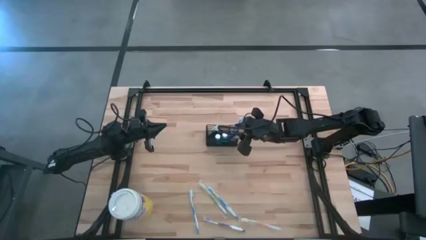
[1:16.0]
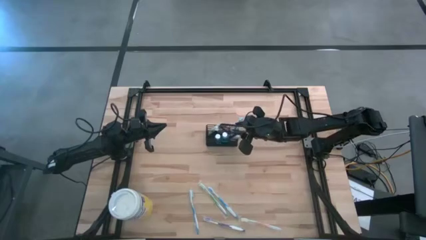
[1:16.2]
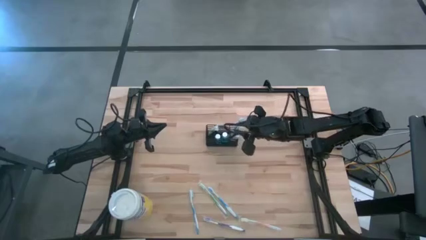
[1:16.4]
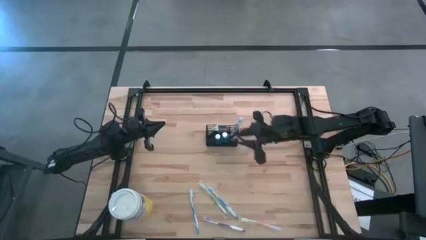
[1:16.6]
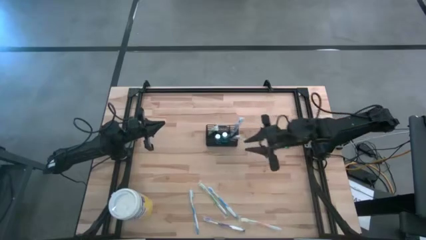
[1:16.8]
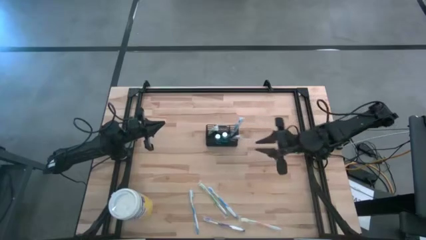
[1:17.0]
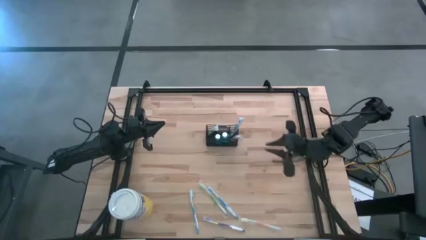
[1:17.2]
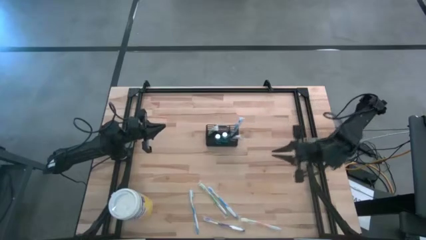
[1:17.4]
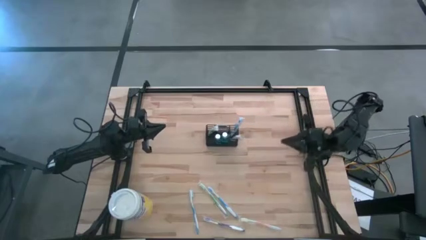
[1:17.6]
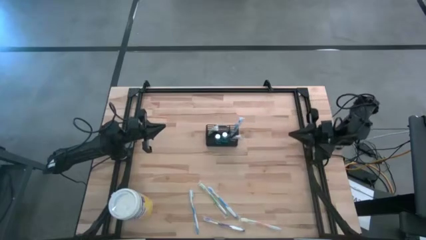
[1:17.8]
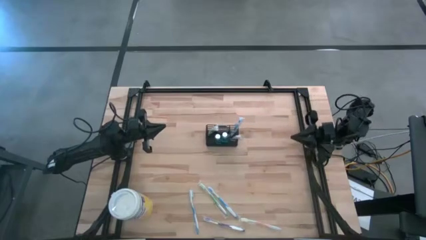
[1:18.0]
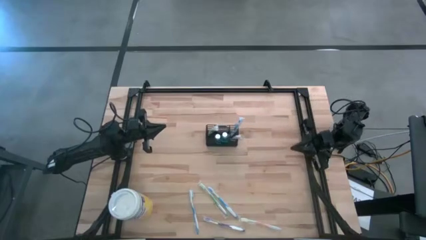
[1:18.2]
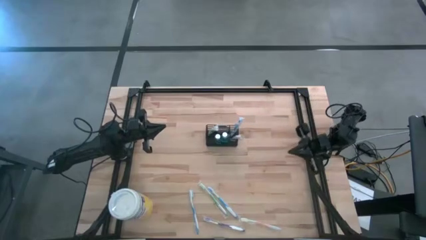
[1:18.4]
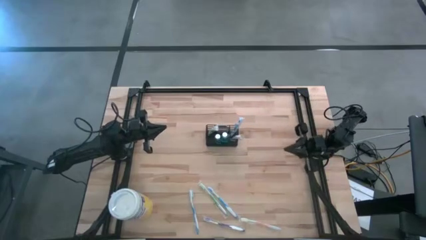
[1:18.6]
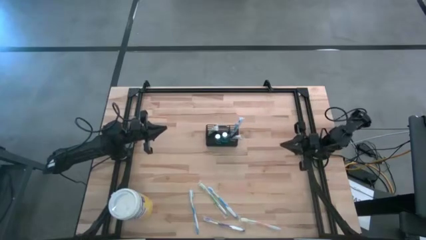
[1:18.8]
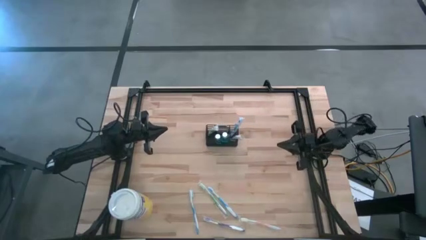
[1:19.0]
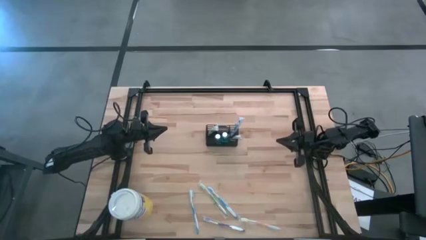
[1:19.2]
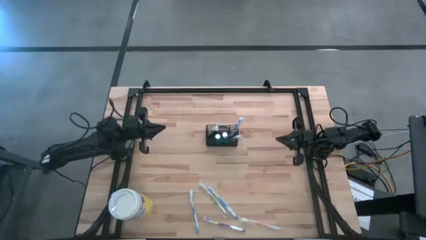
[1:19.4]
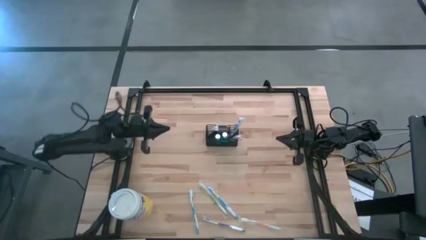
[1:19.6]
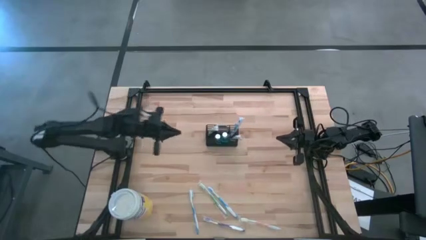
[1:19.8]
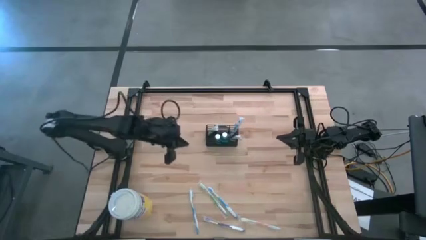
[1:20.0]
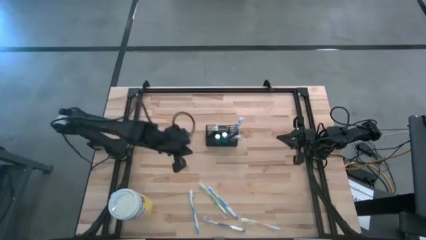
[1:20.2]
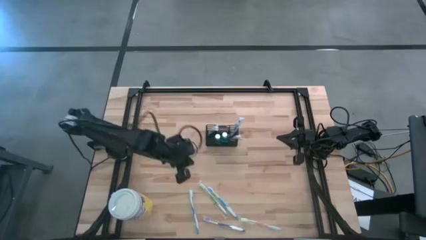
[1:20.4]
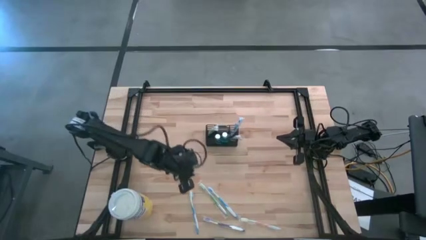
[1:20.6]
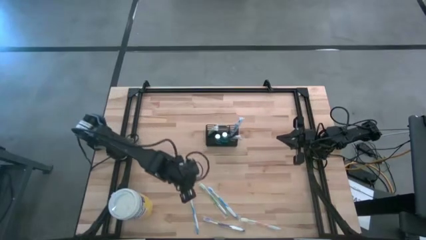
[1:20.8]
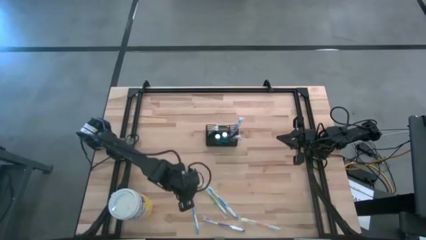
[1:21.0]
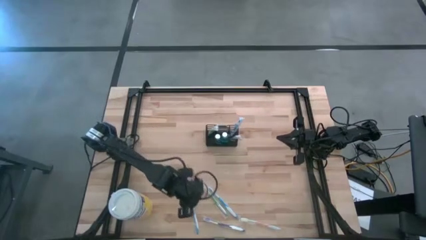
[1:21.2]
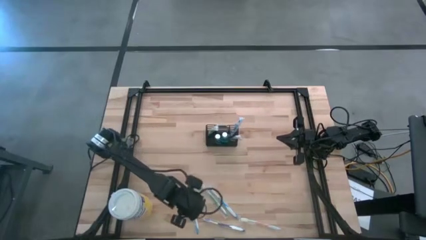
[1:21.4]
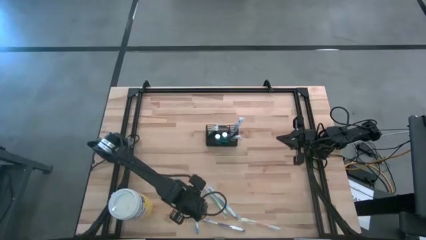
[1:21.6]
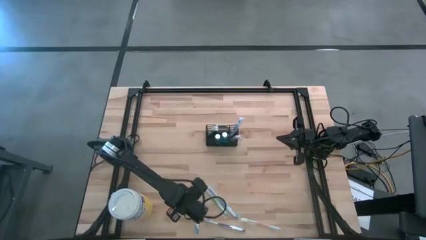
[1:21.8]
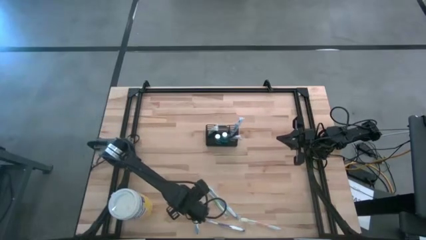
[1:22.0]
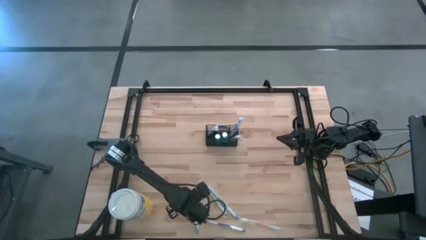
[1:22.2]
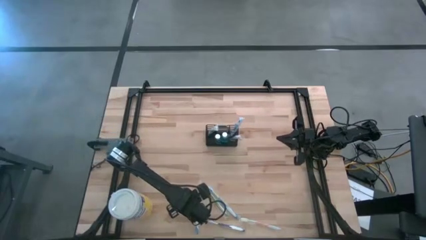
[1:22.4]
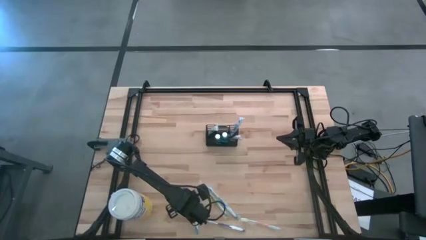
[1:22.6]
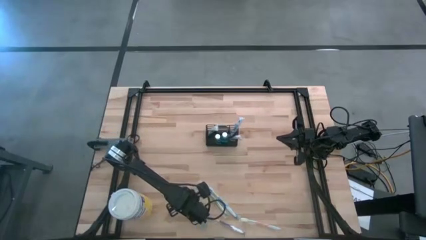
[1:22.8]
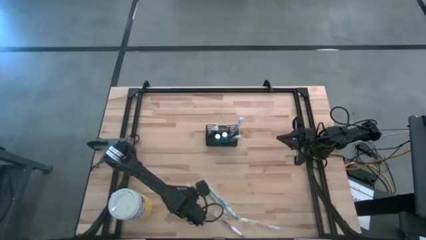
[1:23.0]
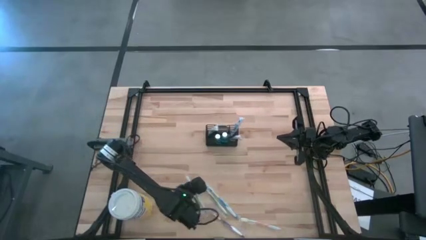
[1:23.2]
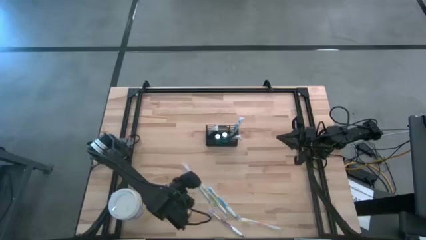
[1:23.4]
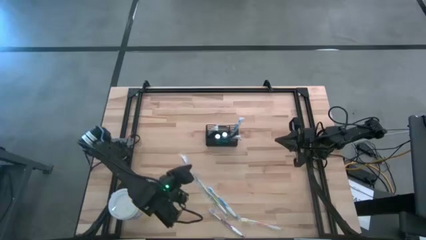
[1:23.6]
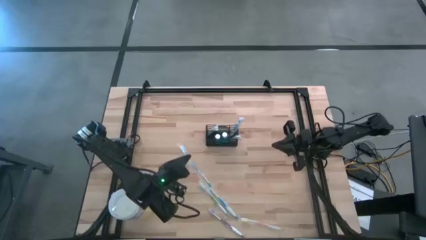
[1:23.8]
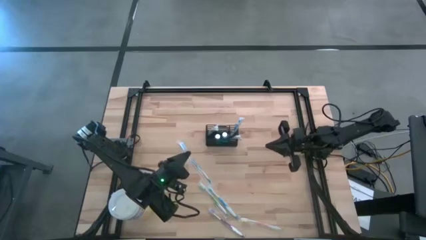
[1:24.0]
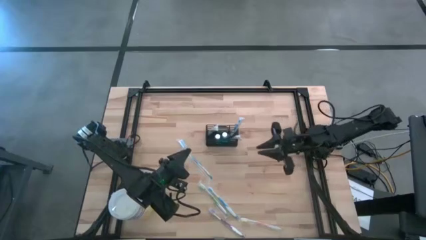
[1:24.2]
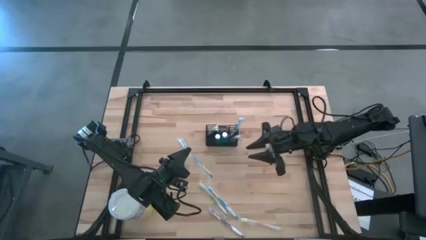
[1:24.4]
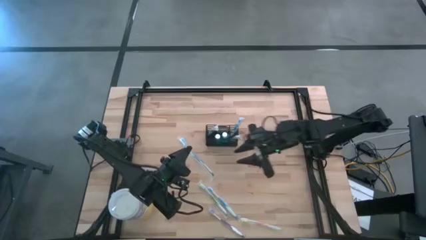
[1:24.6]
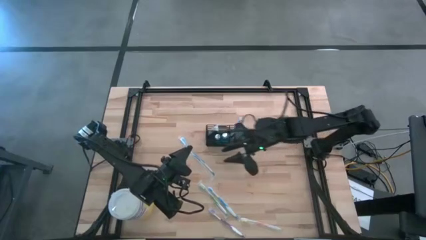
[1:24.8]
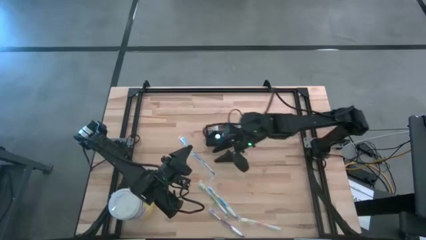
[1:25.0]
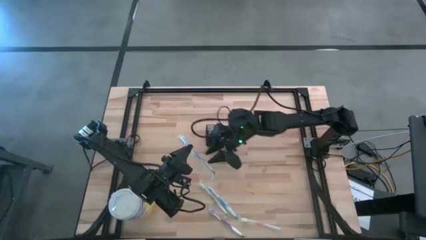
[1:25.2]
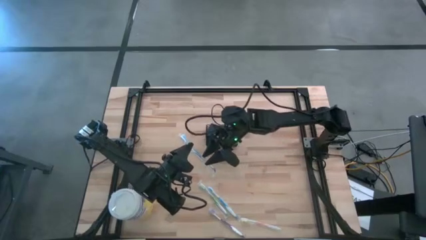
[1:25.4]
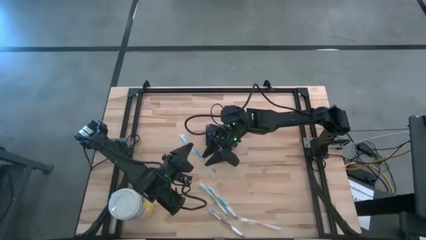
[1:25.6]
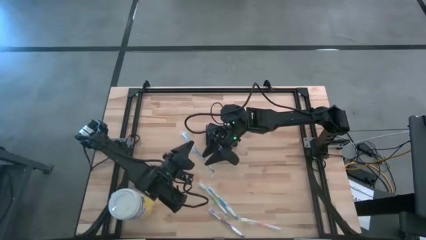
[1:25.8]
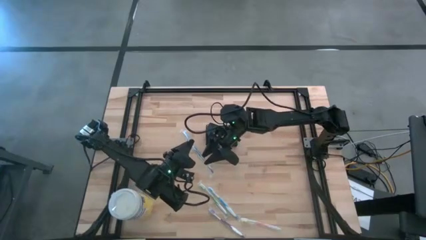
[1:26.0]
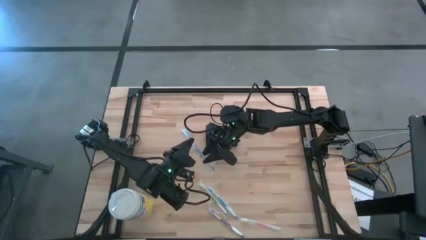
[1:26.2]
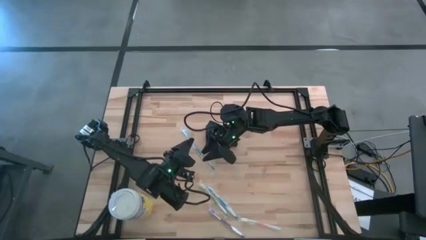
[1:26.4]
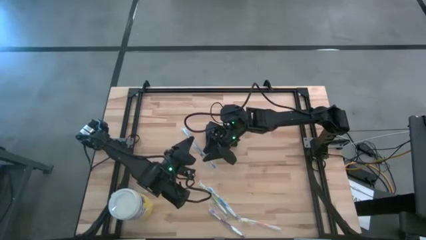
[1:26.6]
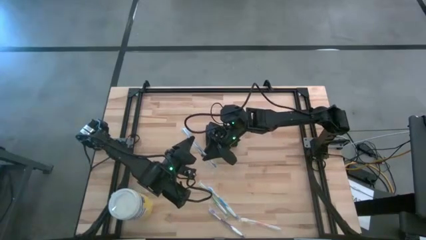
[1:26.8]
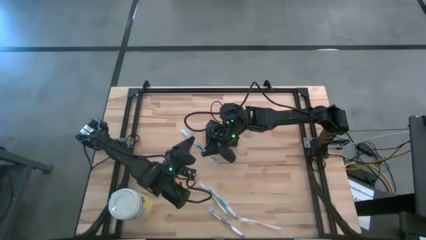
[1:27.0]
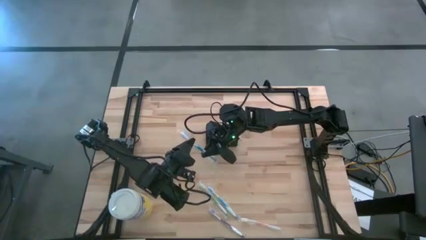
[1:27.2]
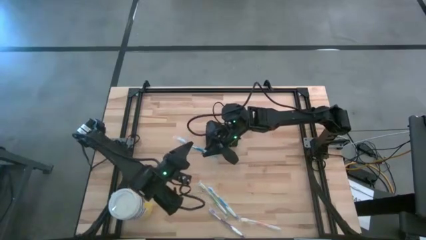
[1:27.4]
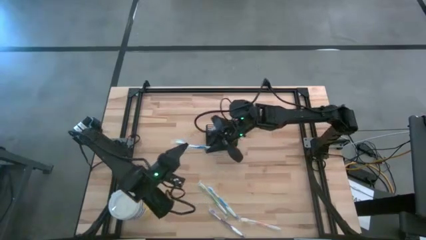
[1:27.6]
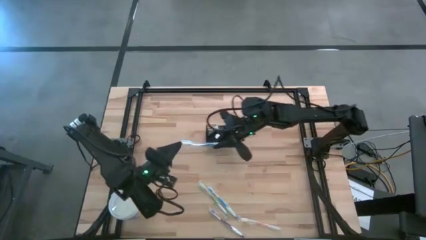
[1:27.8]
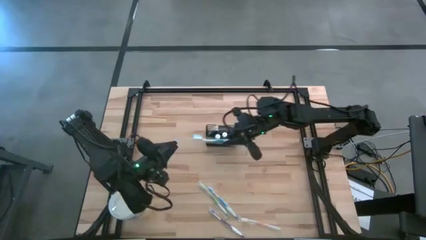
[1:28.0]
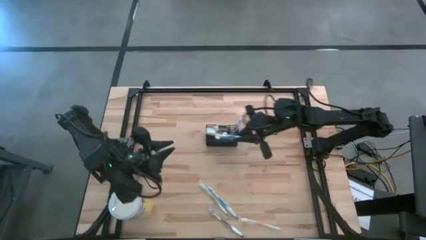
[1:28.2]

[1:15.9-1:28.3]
Task: Pick & Place toothbrushing station
Put the left blue toothbrush into the wire organizer

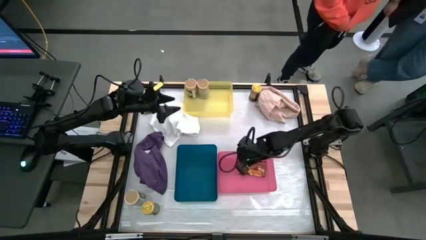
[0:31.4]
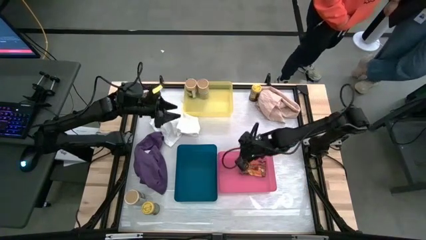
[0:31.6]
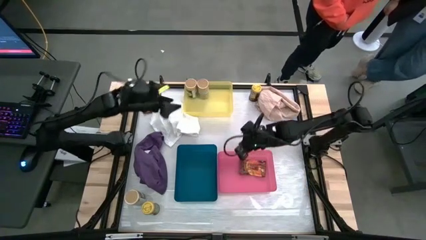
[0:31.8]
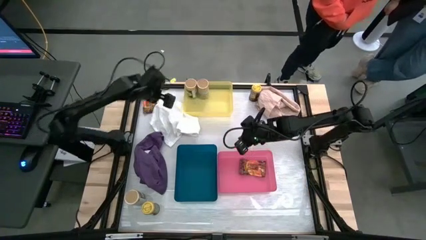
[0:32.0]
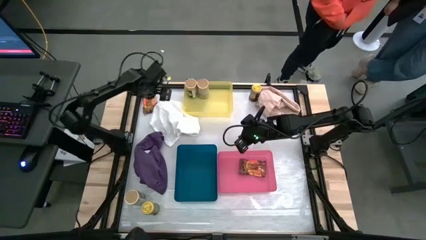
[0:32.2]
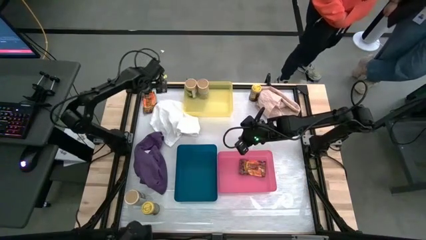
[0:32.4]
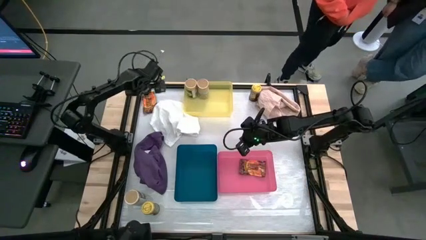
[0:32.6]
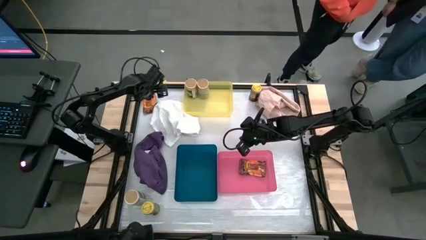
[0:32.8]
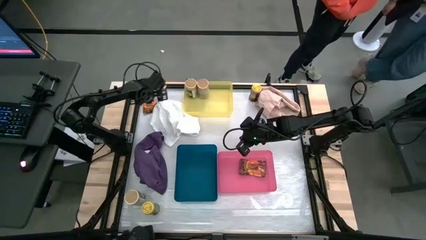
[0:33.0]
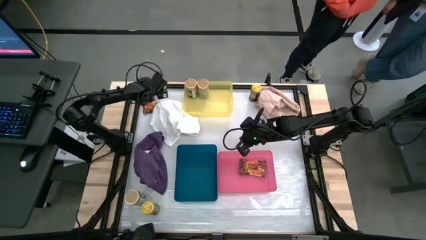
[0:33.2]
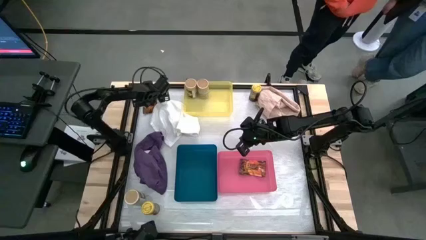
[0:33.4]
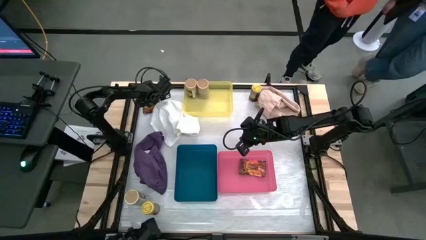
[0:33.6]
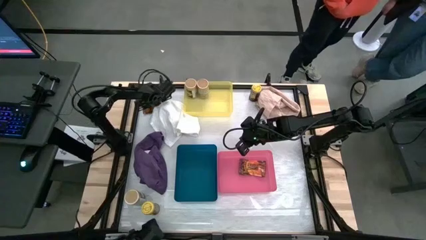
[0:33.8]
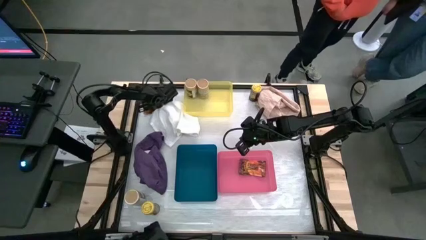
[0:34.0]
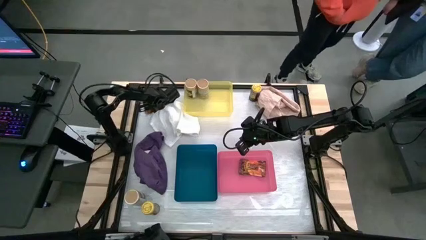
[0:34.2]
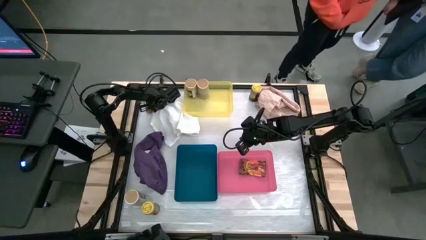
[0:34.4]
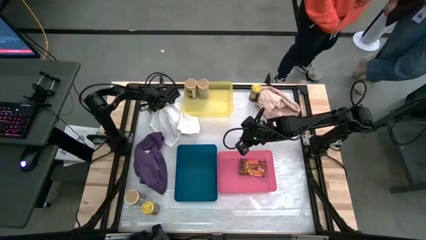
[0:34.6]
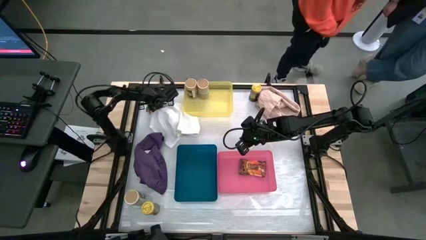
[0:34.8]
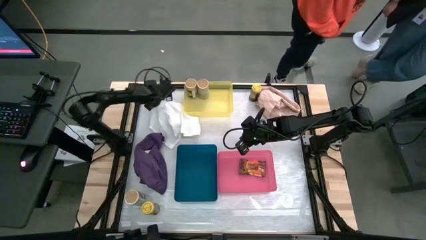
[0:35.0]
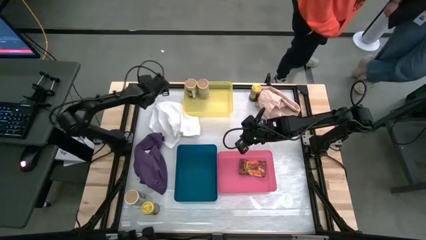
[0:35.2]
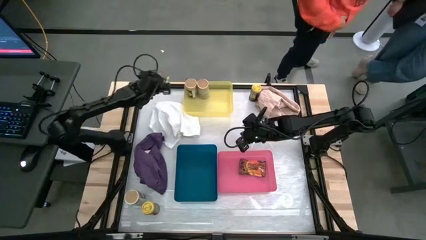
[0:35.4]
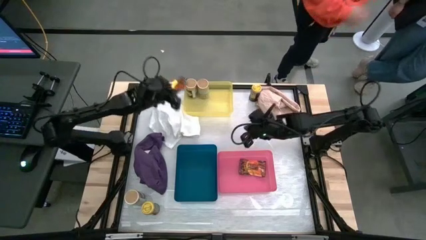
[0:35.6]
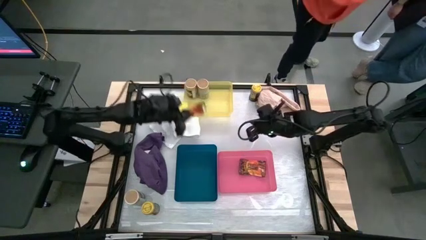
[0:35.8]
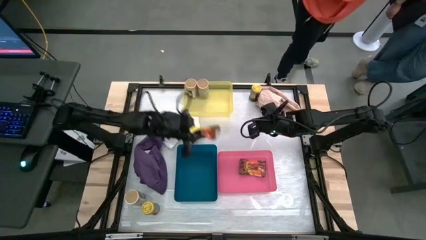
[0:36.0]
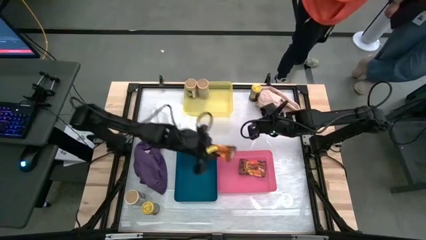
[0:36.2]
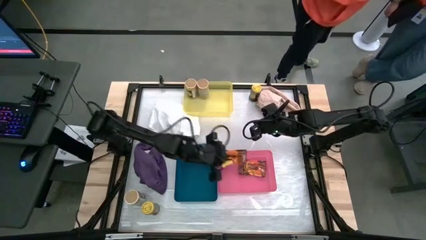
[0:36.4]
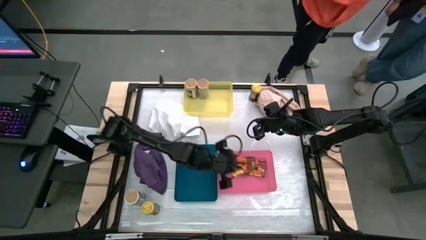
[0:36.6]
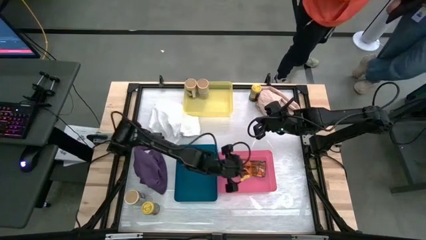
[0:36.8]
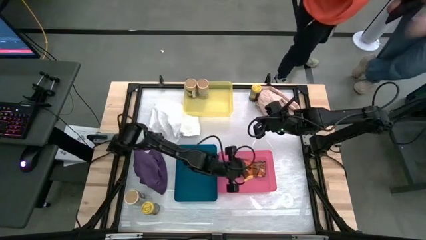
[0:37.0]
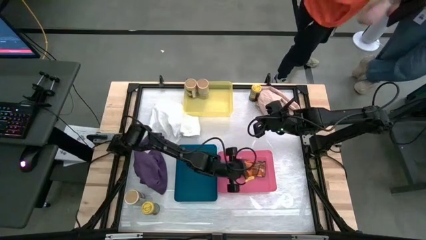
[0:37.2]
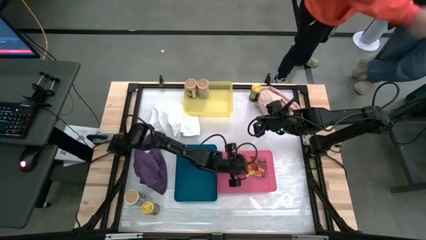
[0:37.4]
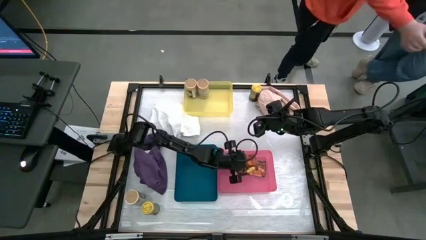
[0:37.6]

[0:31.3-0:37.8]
Task: Sort spices by type
Put the orange seasoning bag into the pink bin
